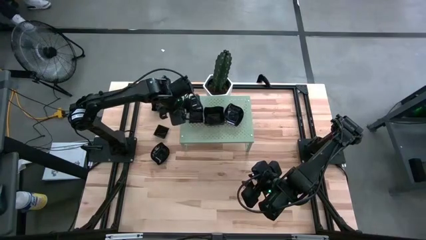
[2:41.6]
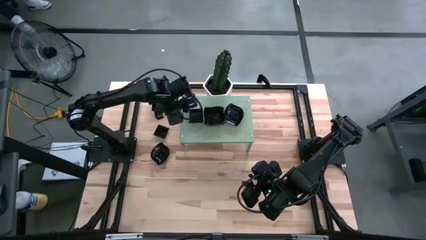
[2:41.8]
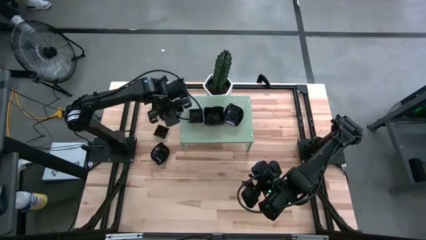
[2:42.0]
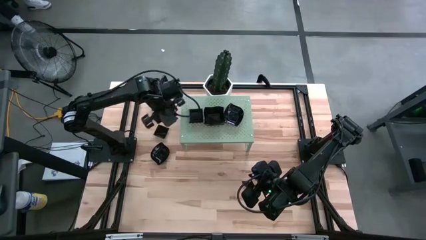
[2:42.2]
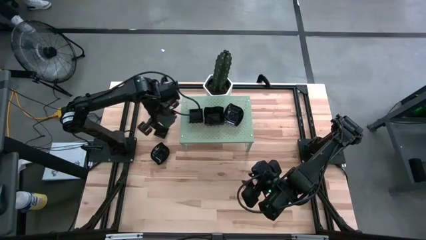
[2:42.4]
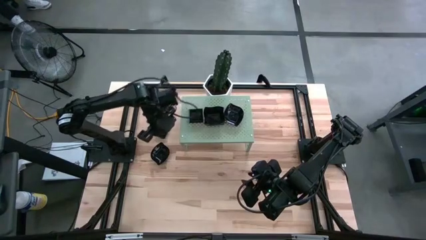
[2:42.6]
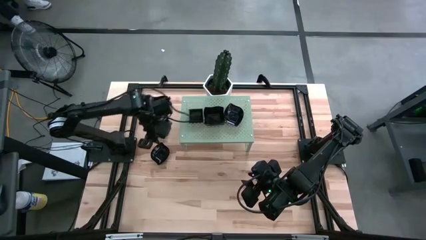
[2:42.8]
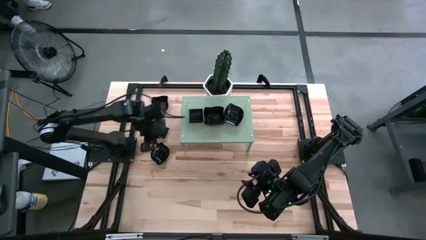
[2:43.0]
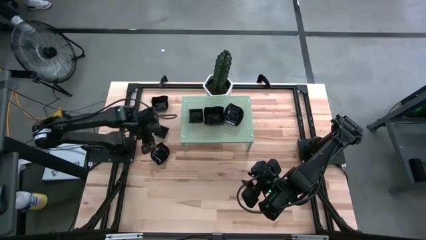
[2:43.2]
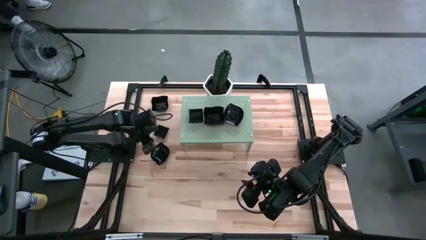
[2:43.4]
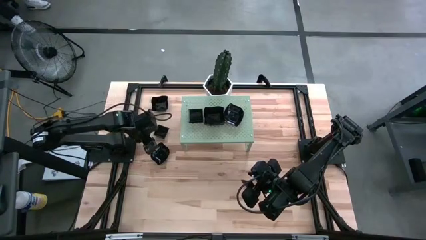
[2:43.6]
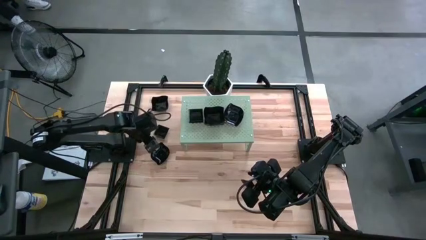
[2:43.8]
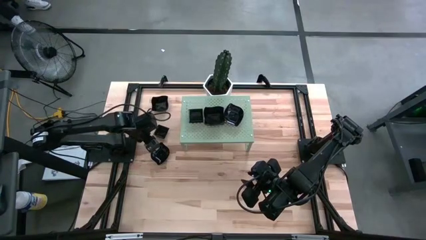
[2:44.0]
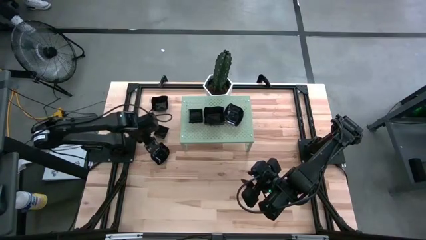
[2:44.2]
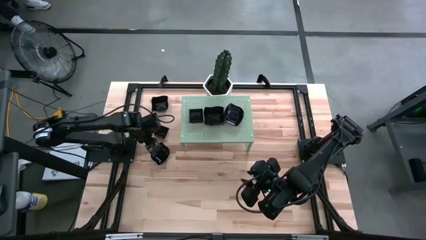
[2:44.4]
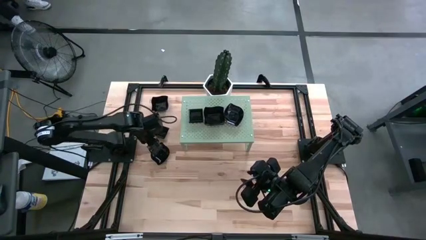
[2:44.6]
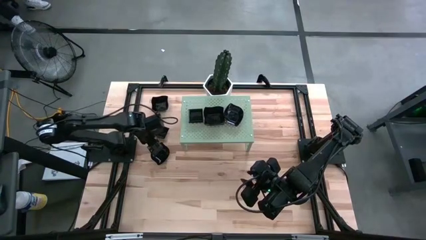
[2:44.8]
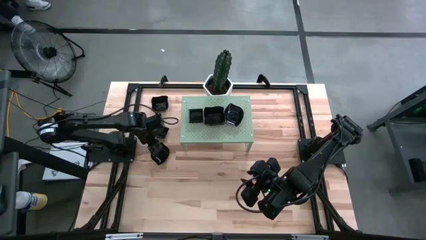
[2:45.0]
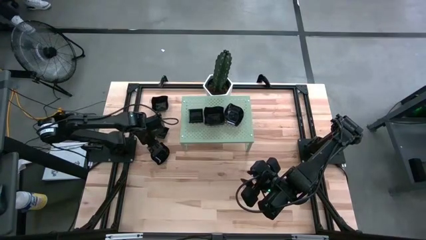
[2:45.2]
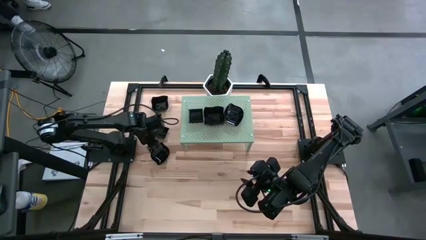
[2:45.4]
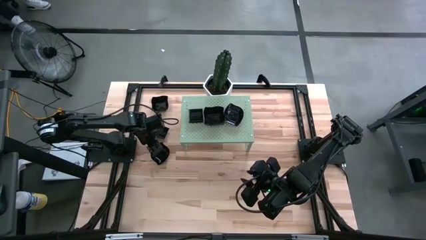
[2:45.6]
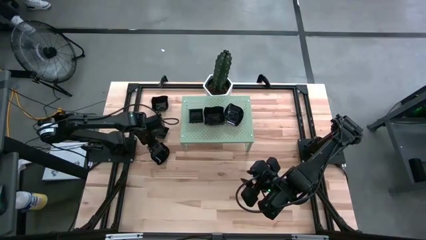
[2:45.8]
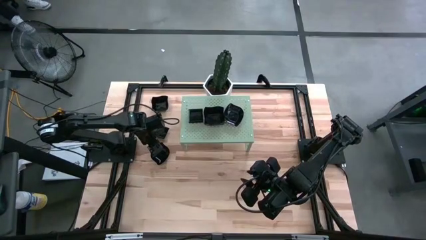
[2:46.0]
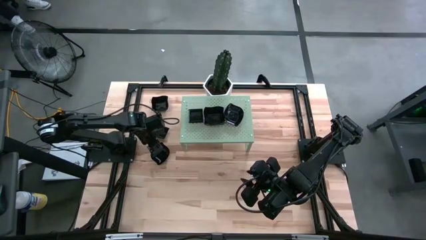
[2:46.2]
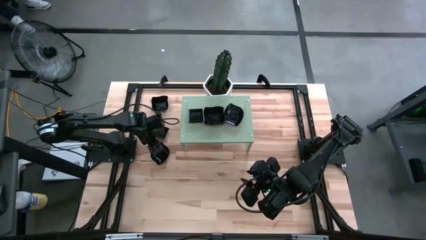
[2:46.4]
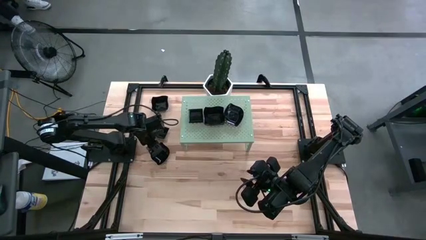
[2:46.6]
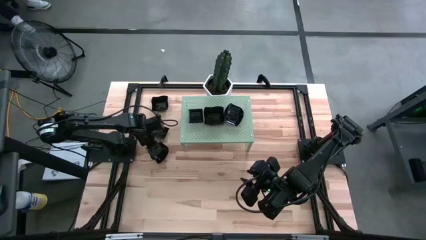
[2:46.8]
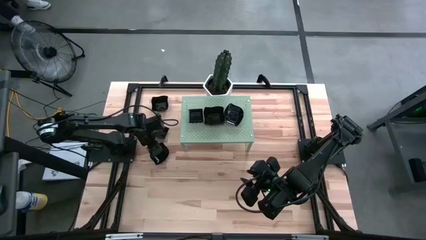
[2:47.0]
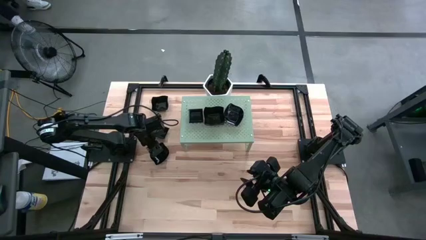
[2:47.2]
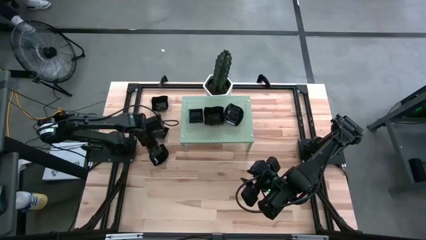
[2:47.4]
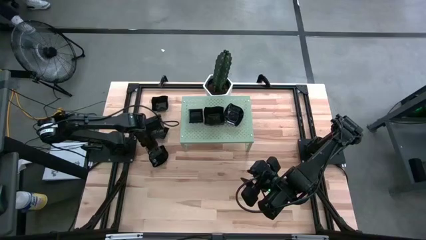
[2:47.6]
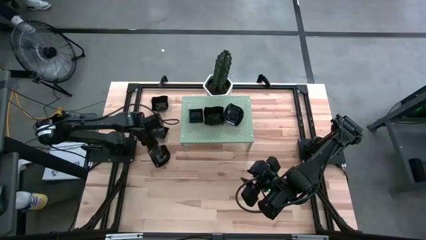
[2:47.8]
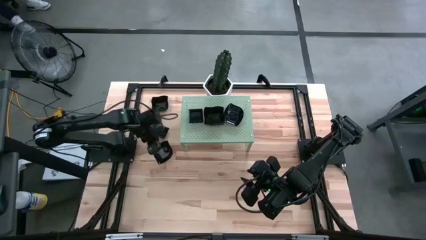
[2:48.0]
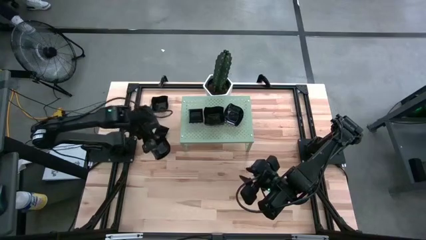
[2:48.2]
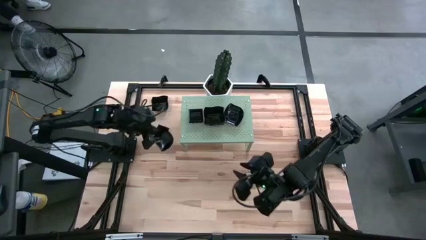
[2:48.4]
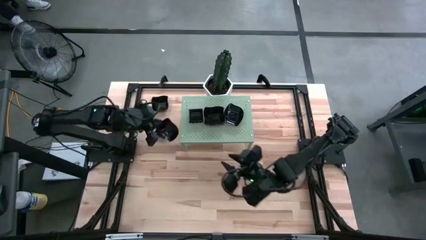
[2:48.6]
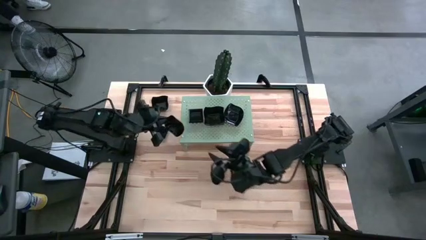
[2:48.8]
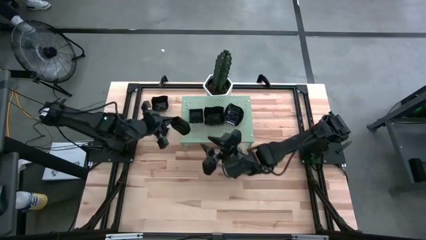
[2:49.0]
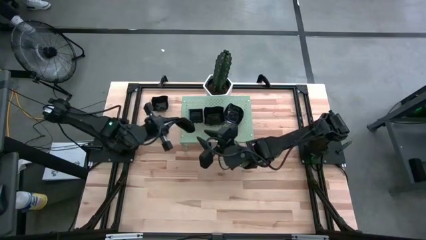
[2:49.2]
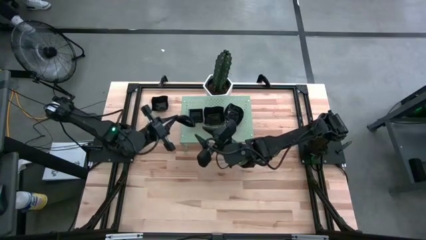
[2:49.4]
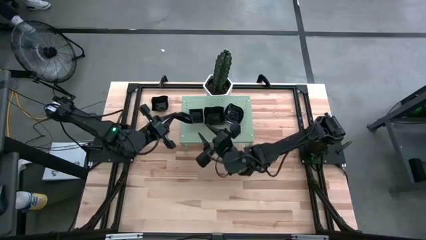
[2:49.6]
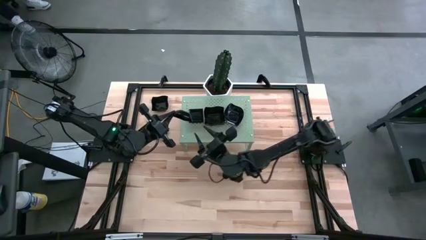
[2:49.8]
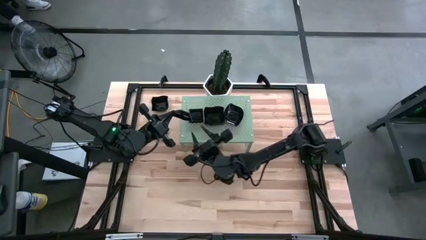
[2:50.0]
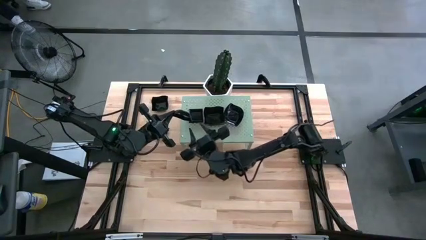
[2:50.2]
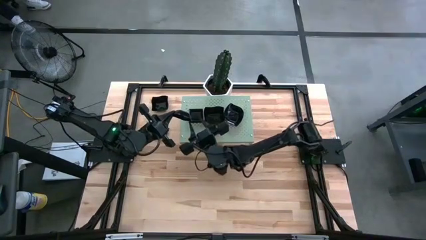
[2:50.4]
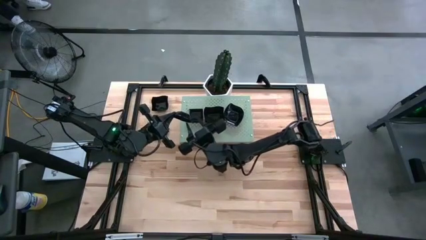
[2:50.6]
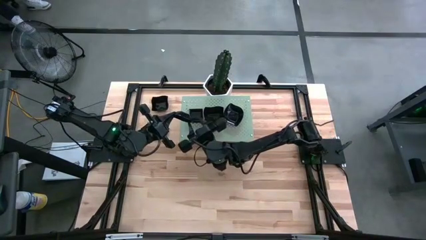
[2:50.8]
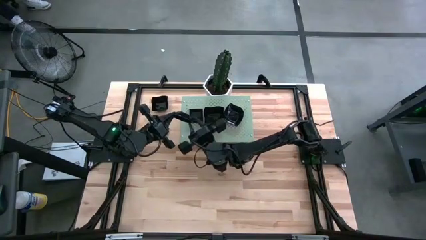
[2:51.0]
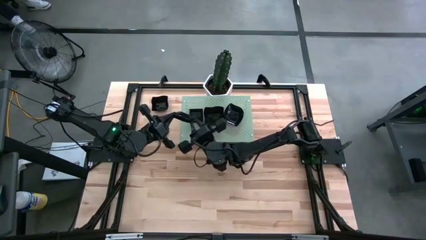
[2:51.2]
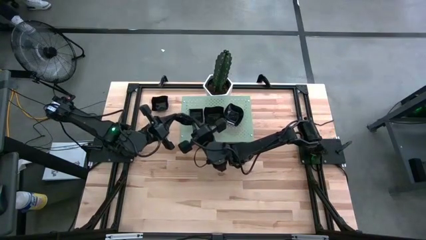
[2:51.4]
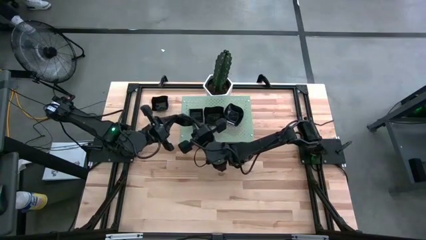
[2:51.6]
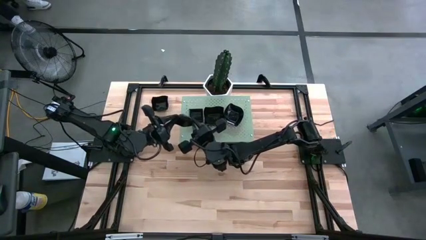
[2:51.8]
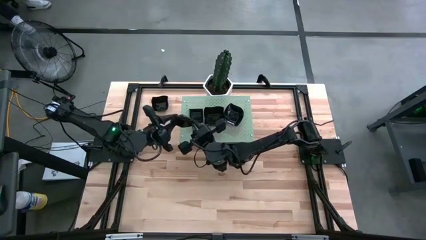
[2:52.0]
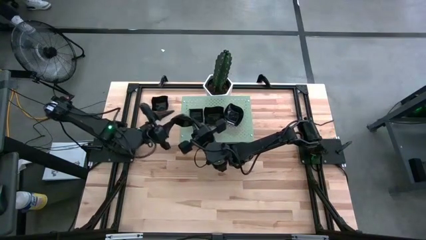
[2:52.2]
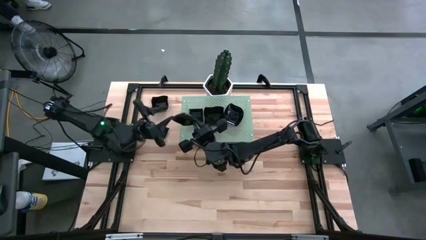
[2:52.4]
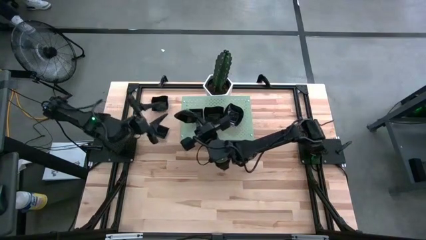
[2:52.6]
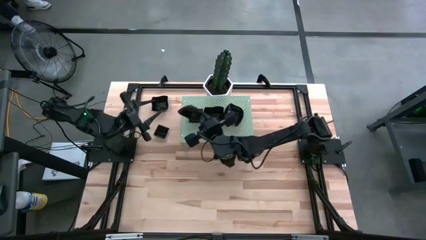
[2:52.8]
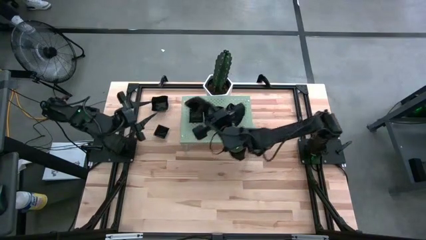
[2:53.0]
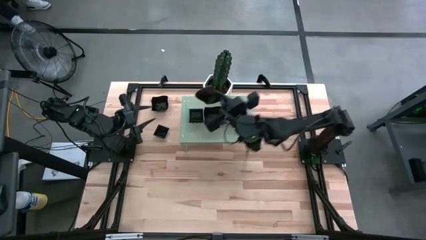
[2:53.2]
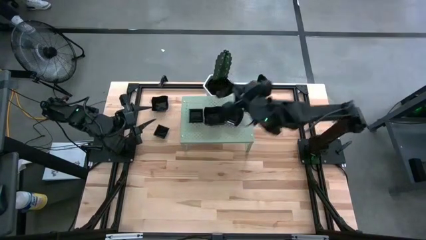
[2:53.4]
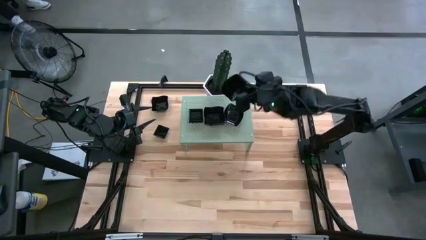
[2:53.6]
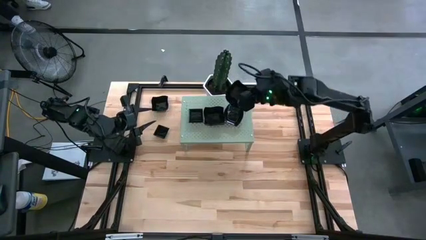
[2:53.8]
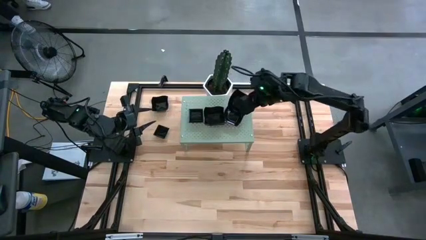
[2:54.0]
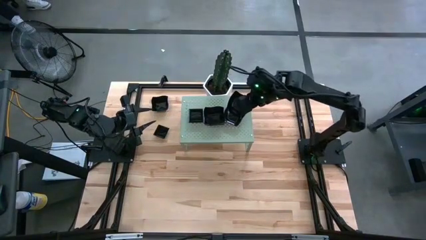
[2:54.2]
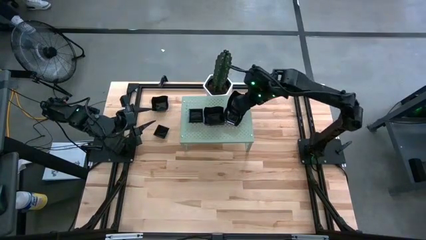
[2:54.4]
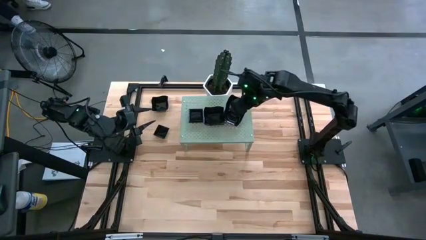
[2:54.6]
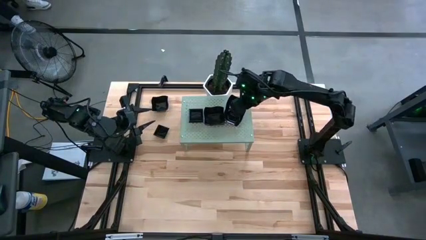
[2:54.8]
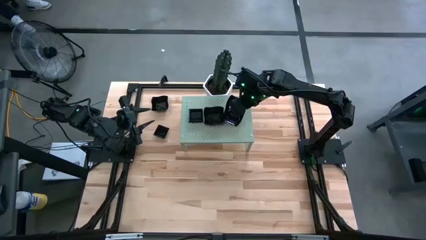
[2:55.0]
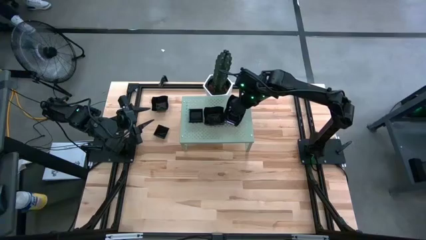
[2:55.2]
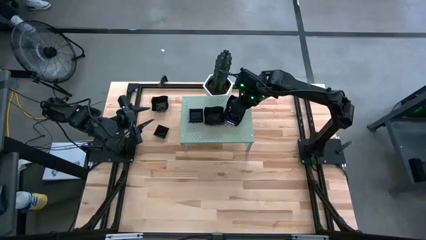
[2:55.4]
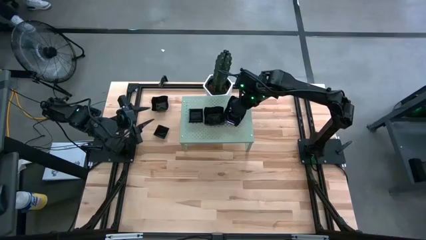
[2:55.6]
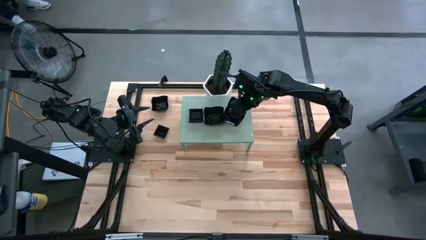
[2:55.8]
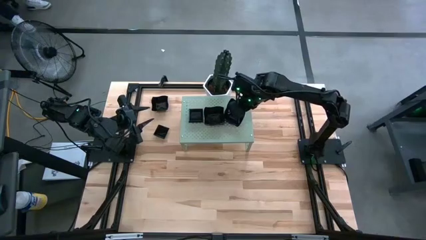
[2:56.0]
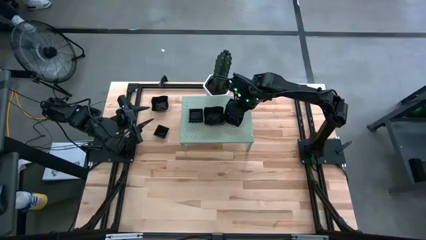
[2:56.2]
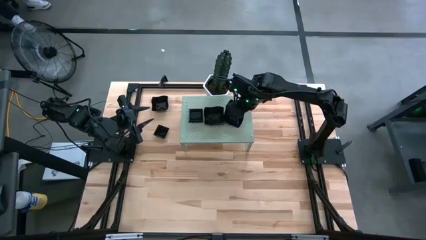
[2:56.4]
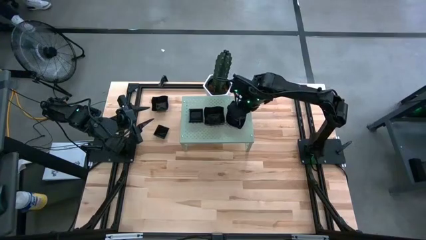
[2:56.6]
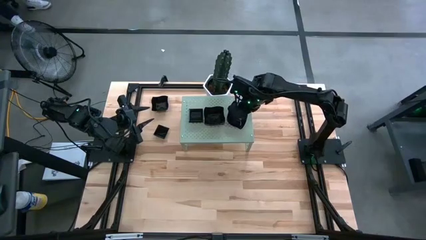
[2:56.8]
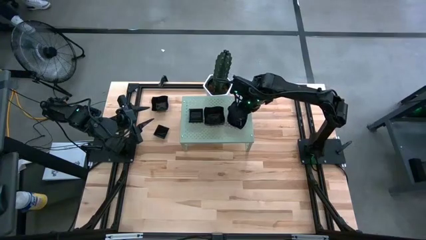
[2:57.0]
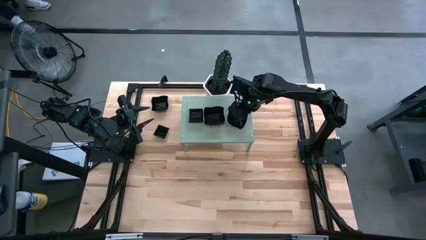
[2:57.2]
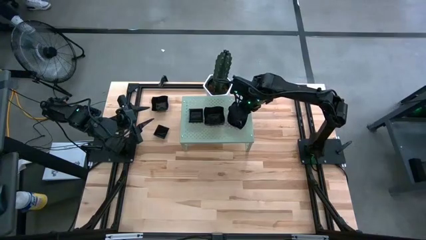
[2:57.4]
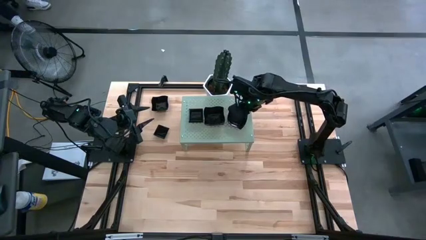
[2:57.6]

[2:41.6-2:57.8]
Task: Pick & Place Mini shaped plates
Stack the leaf shaped plate on top of the leaf shaped plates on the shelf
